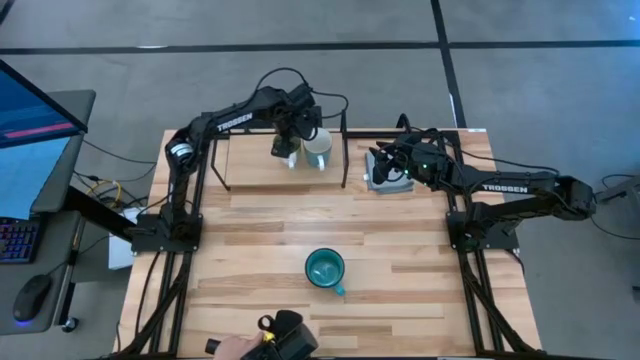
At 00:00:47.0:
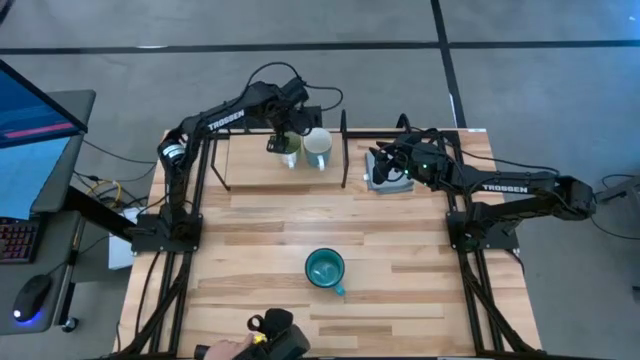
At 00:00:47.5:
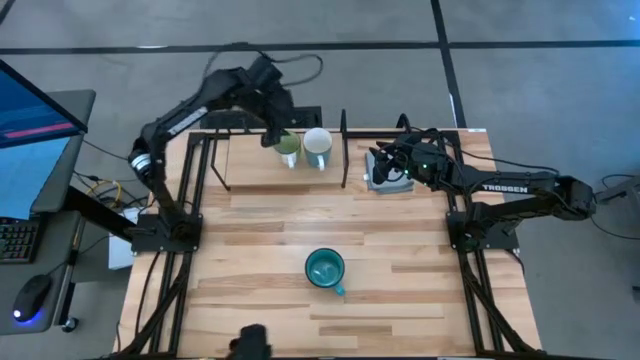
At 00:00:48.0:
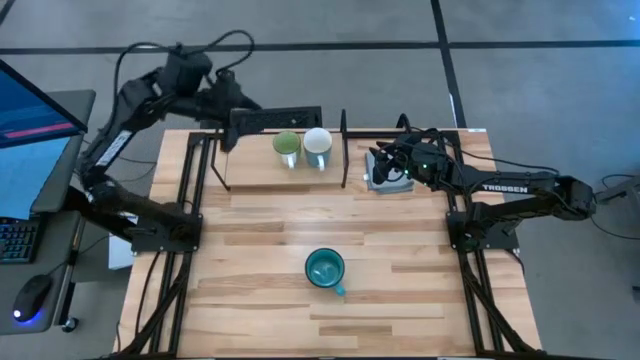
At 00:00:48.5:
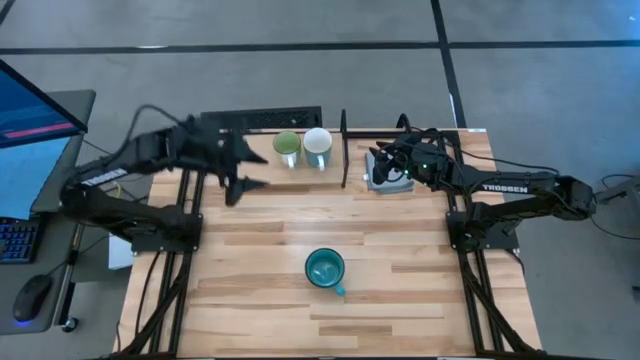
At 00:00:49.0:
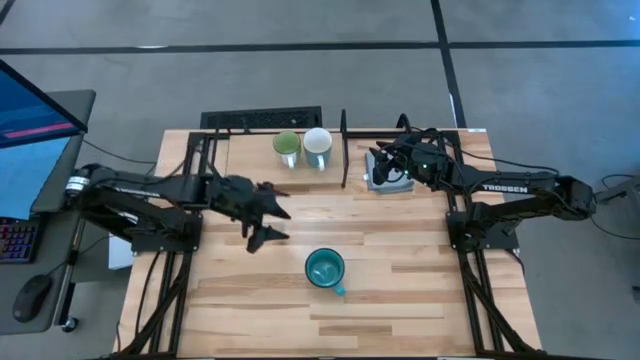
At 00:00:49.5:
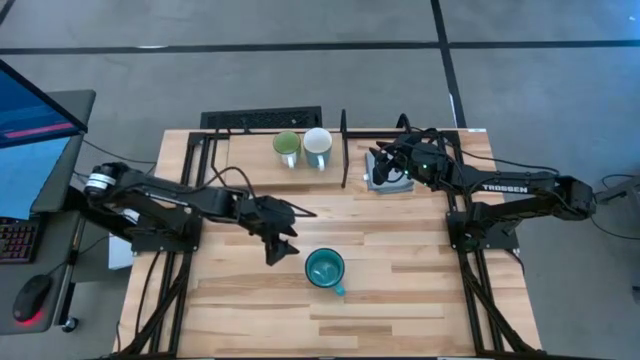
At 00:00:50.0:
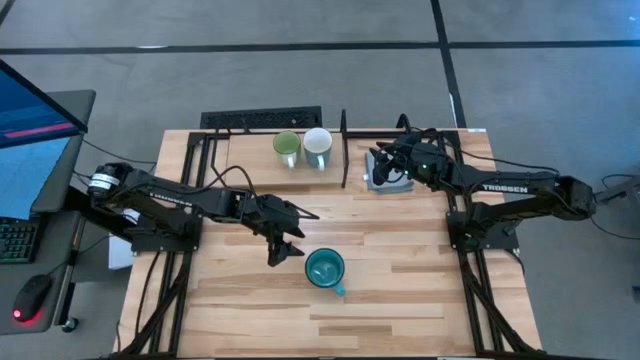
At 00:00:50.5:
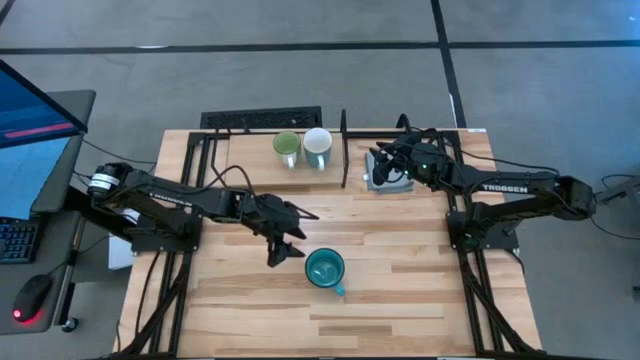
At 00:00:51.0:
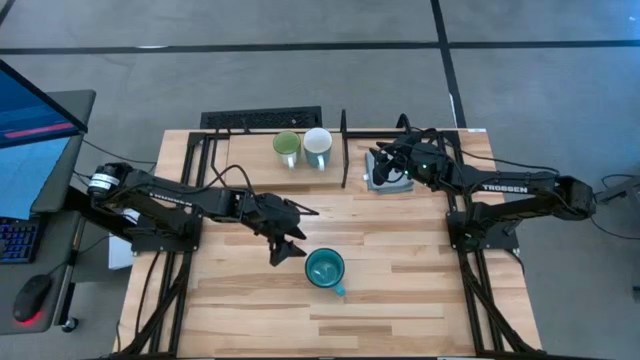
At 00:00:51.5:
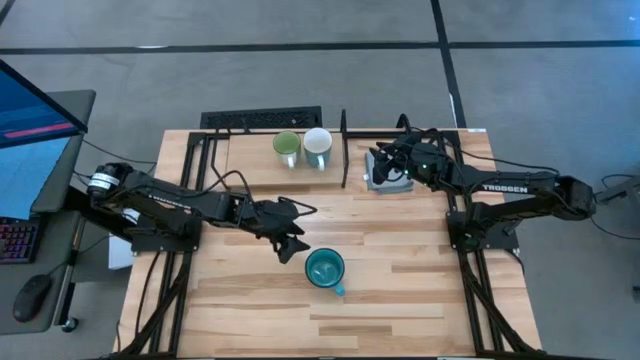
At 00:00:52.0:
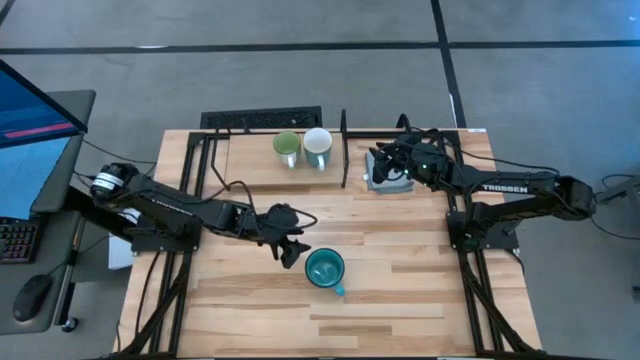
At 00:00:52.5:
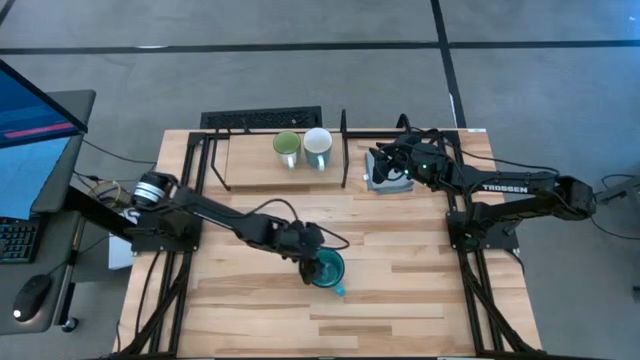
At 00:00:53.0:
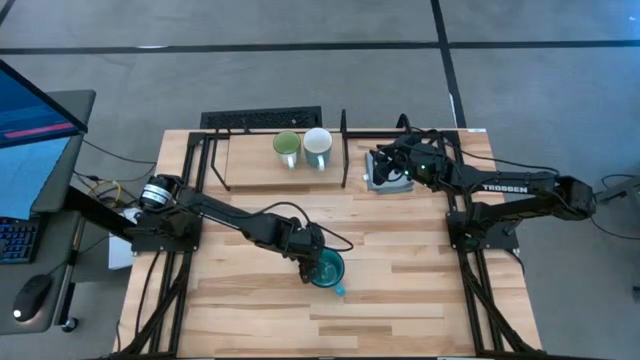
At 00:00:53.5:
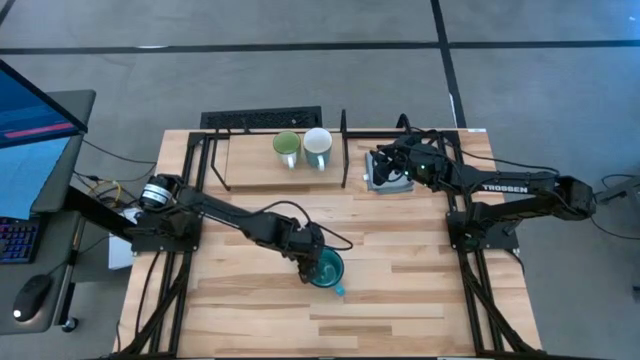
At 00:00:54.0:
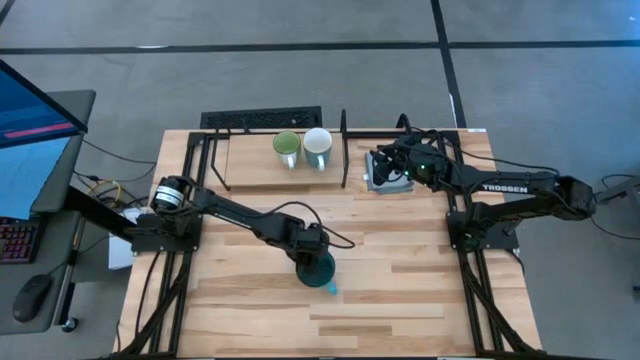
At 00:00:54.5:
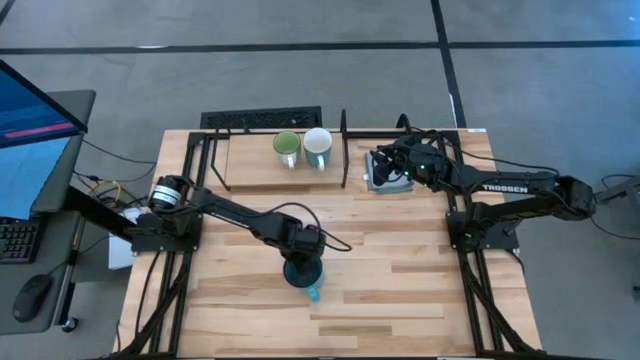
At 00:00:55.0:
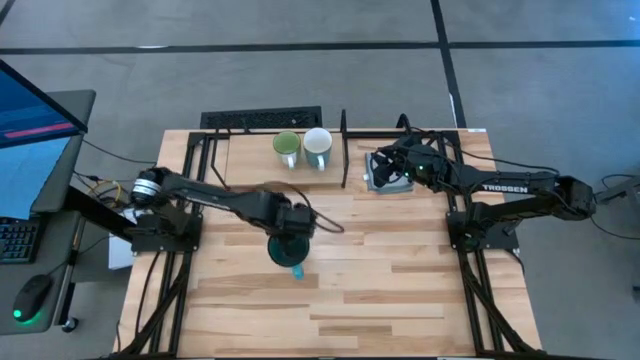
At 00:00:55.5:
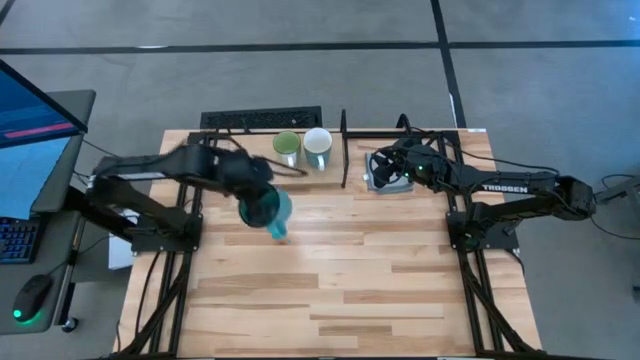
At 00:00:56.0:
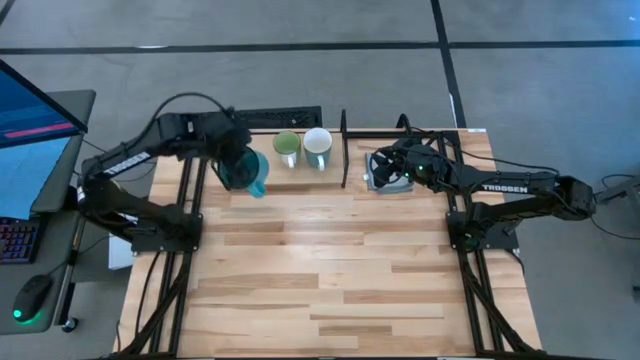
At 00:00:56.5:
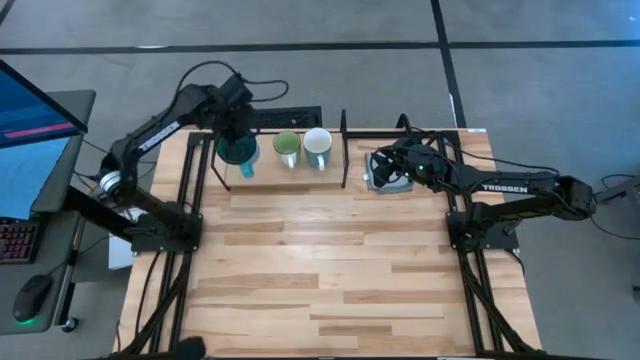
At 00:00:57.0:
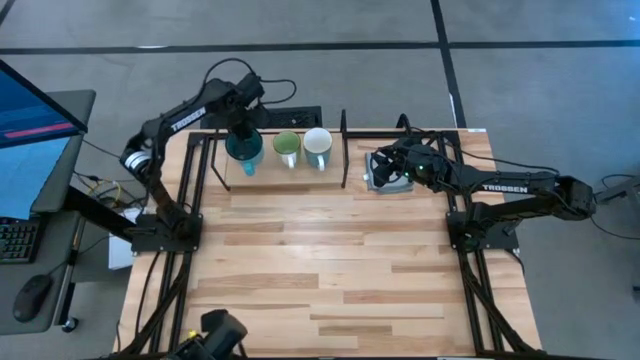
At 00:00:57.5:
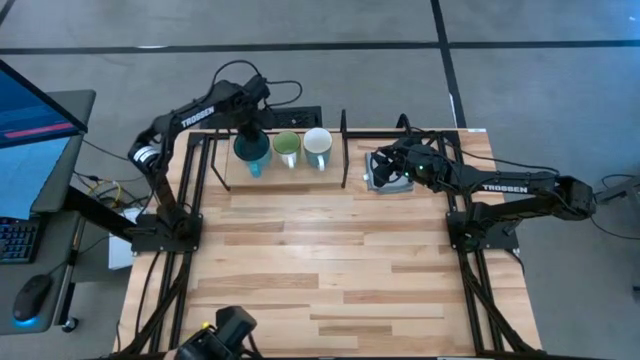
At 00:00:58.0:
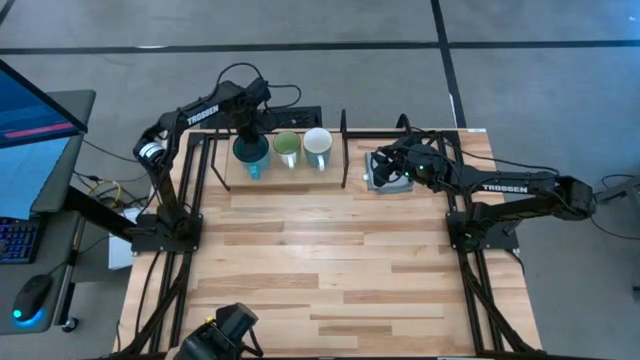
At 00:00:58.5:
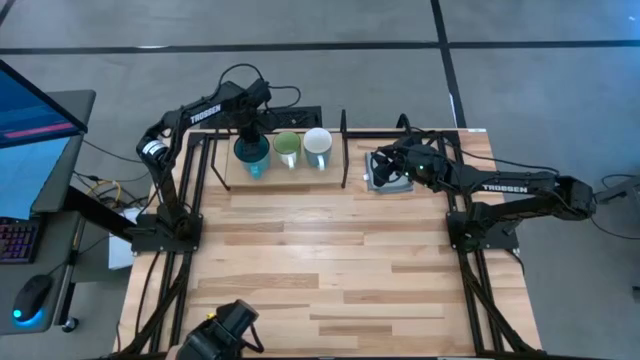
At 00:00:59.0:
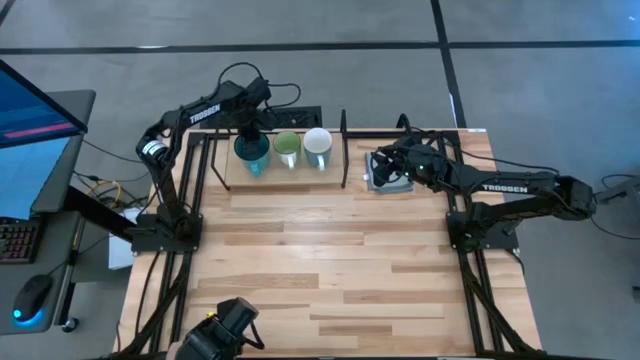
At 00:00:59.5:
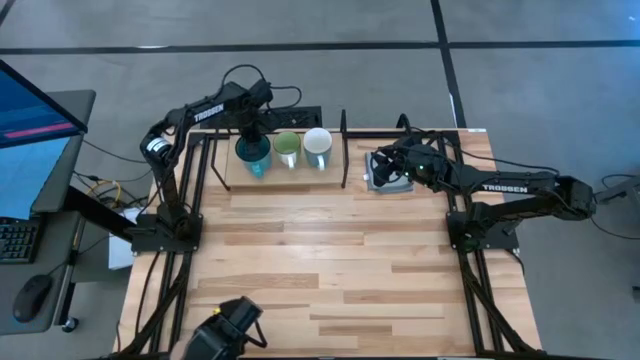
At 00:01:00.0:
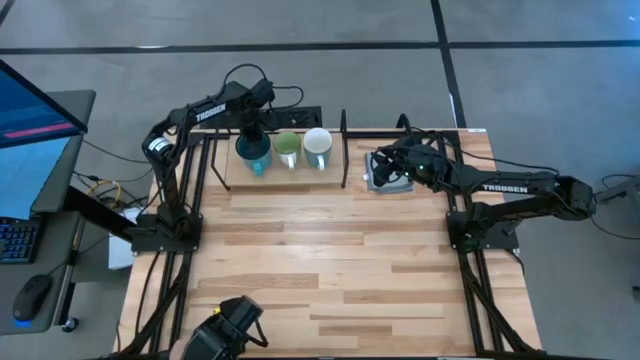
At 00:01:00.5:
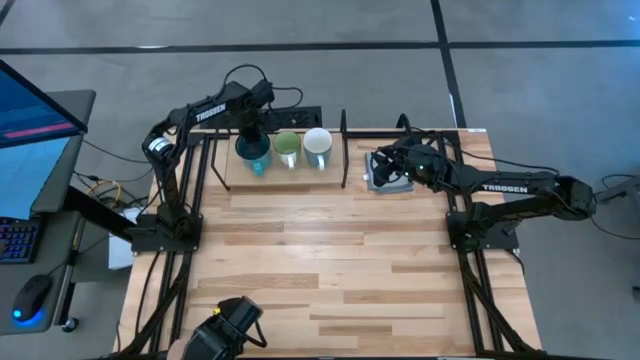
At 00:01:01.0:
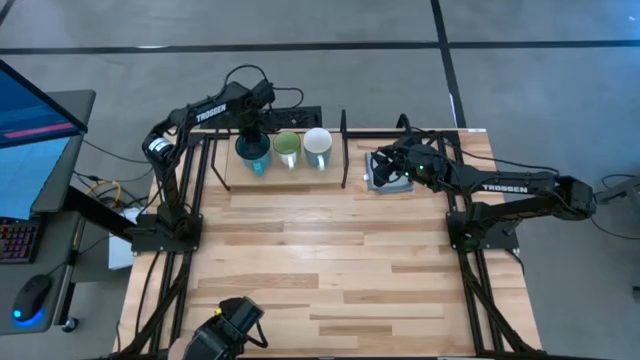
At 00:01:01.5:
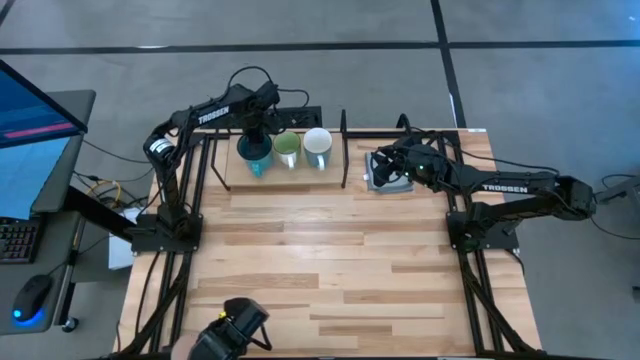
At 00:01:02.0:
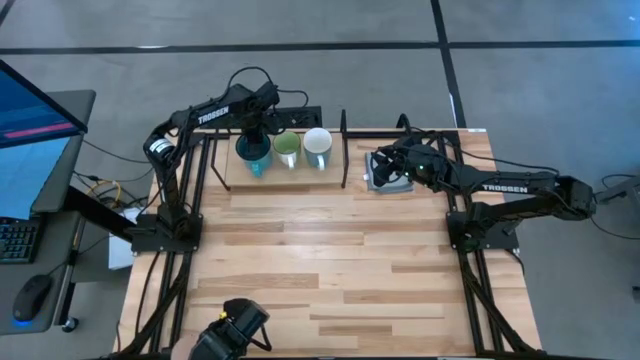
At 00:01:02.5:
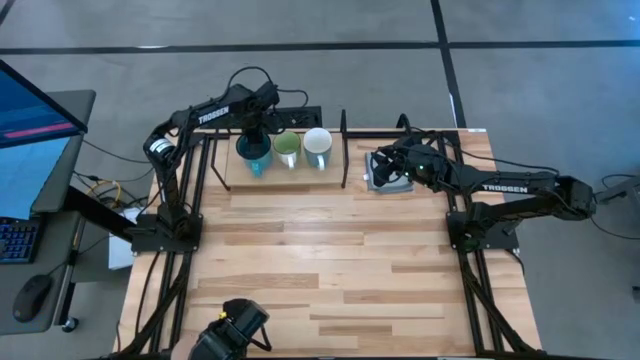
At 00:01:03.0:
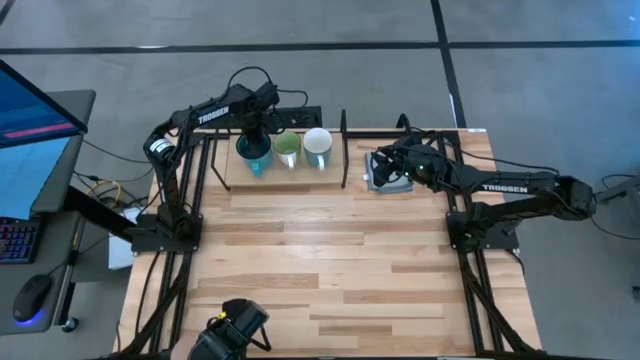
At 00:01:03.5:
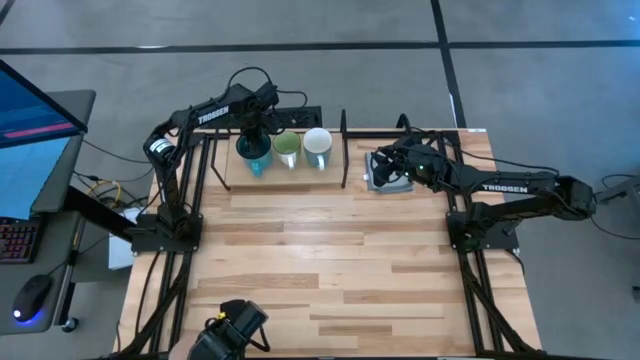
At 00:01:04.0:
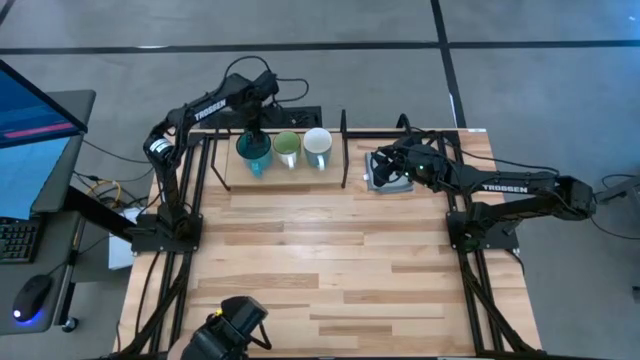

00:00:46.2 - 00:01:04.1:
Task: Stack small to large cups/mugs on shelf
Put the blue mug on the shelf

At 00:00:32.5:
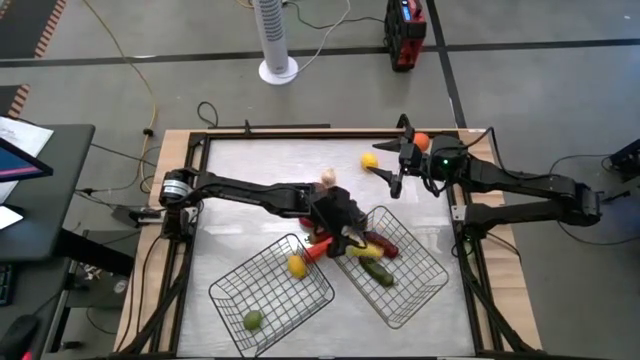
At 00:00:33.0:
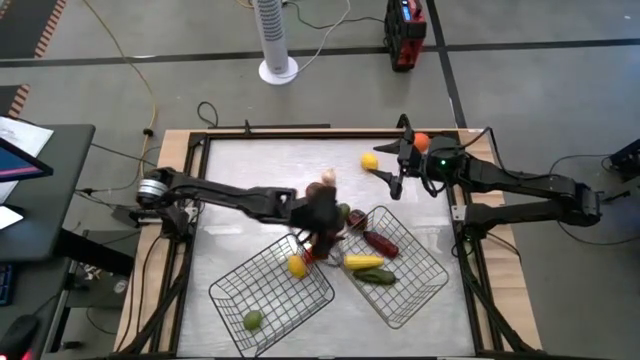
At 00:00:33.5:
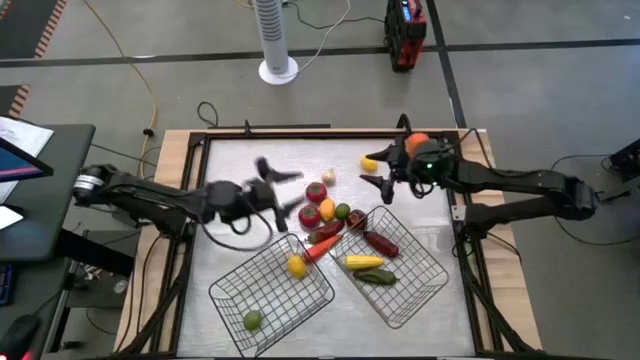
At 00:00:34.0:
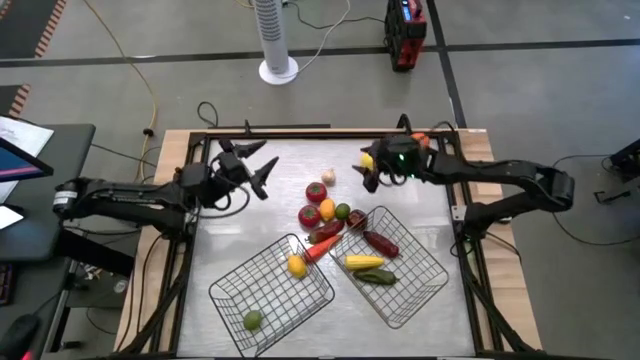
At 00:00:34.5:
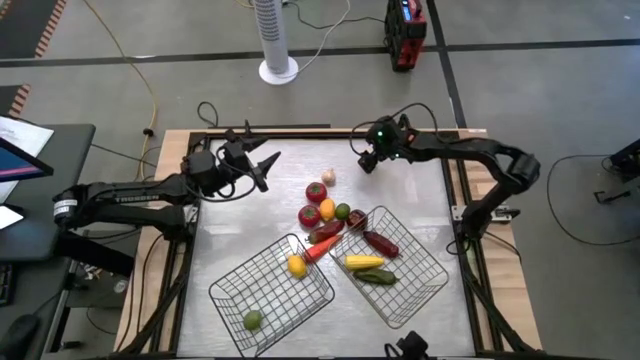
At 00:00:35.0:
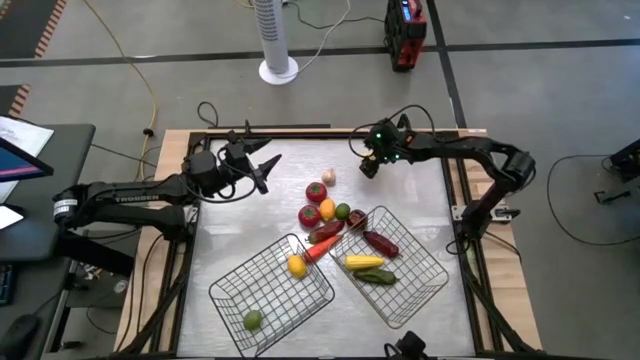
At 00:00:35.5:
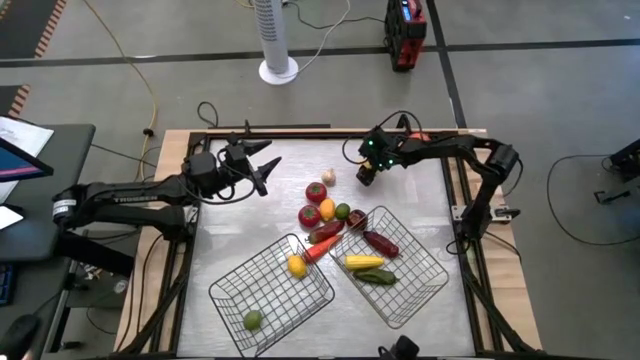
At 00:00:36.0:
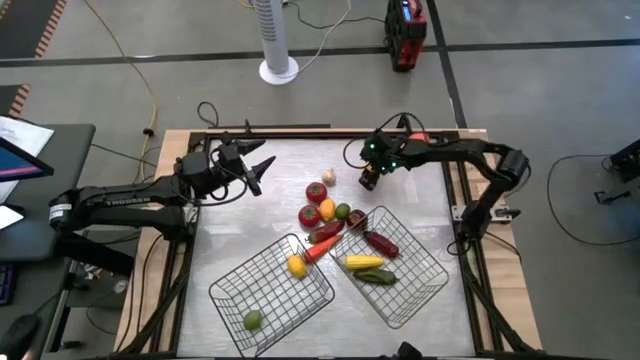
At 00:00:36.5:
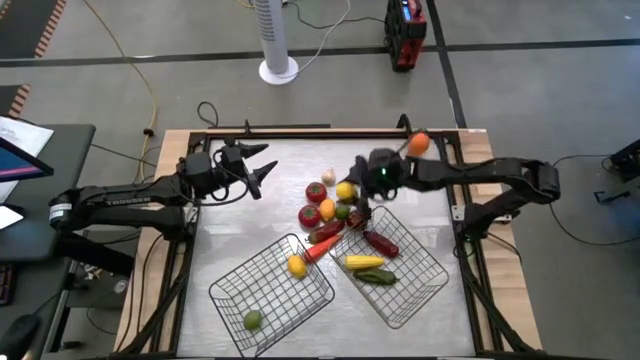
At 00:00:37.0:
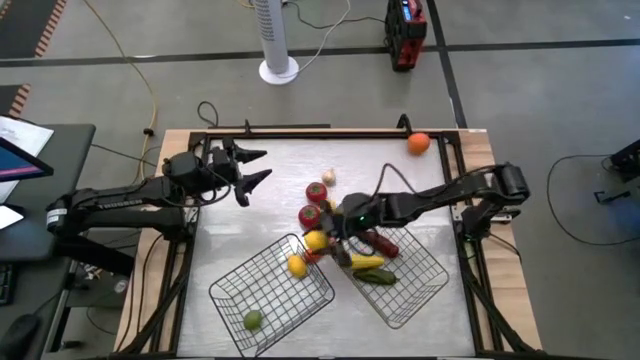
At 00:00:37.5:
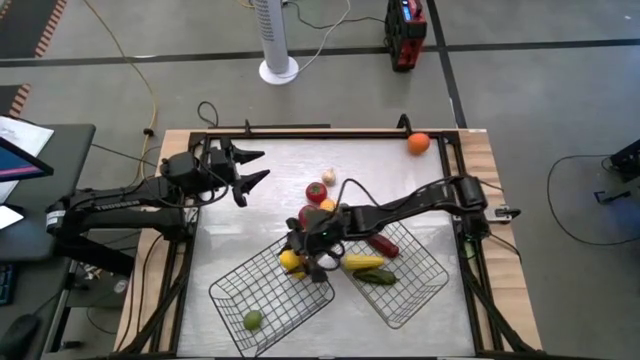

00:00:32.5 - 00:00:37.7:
Task: Sort produce into baskets
Put the top yellow lemon into the black wire basket
